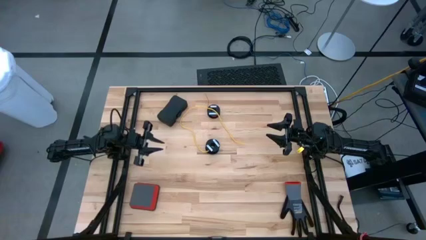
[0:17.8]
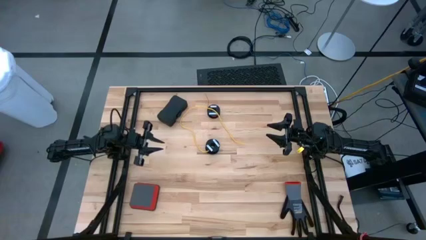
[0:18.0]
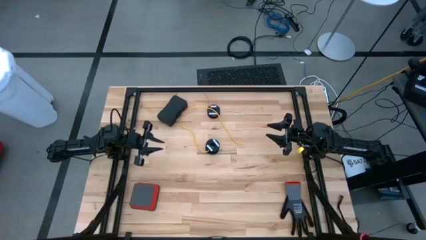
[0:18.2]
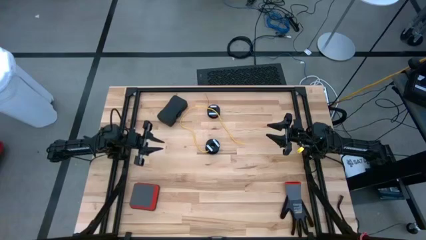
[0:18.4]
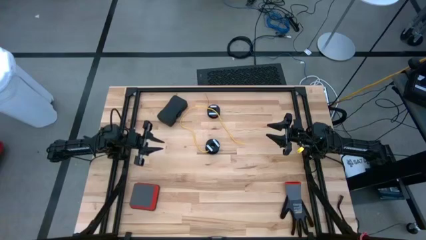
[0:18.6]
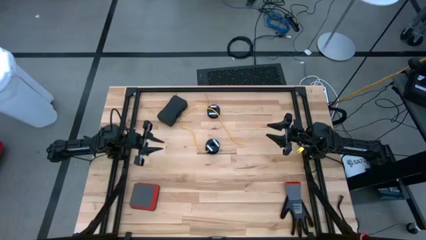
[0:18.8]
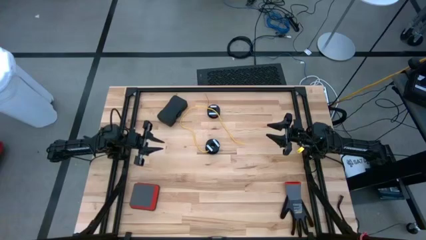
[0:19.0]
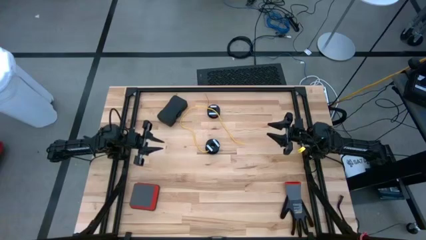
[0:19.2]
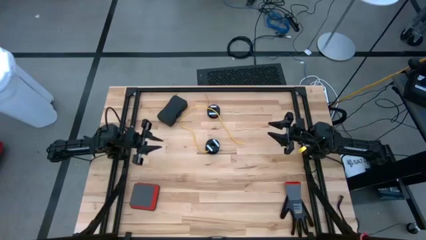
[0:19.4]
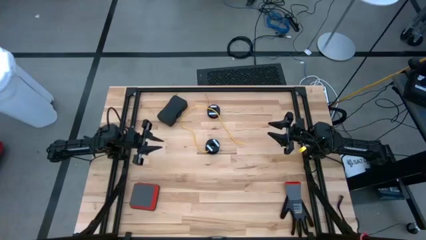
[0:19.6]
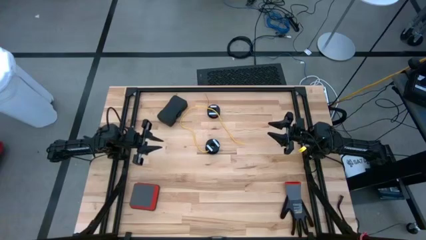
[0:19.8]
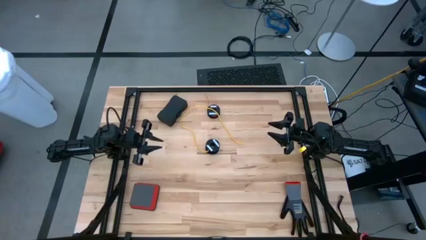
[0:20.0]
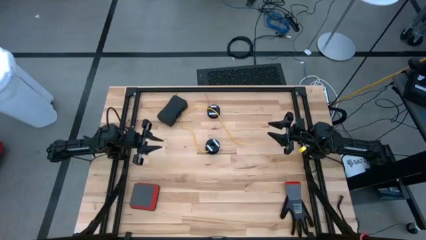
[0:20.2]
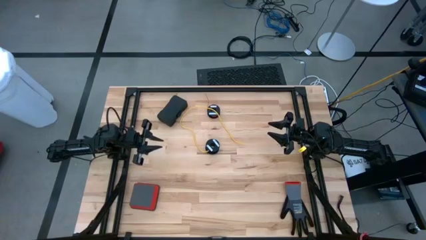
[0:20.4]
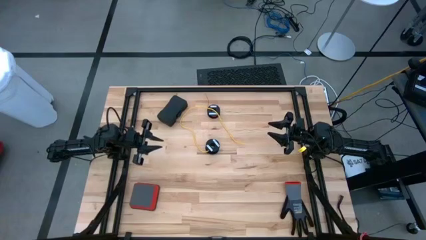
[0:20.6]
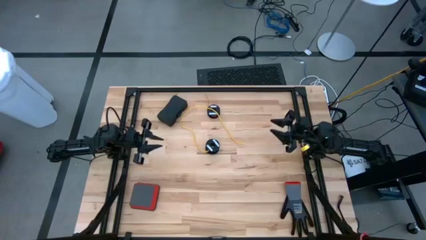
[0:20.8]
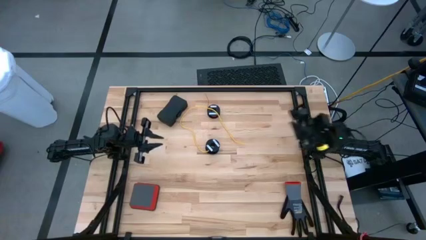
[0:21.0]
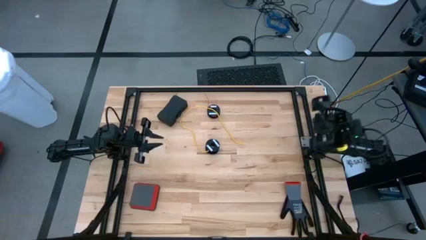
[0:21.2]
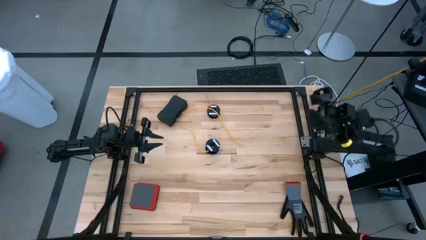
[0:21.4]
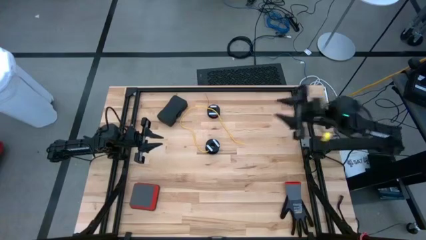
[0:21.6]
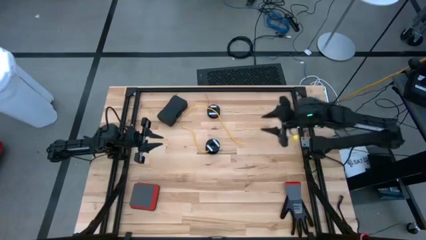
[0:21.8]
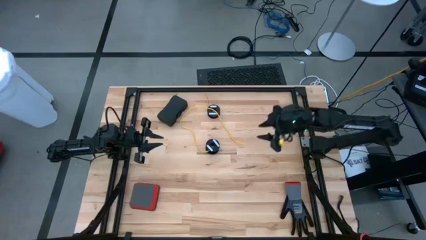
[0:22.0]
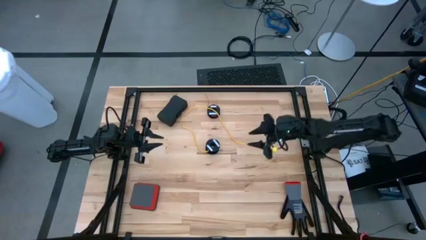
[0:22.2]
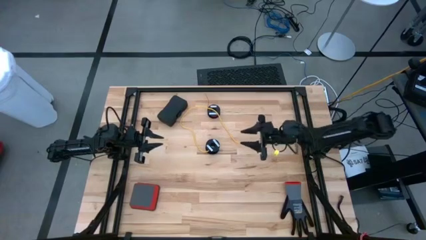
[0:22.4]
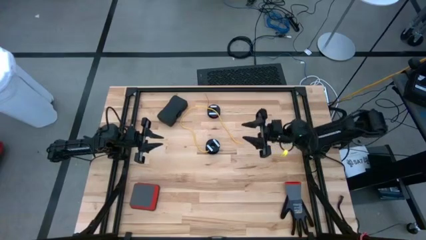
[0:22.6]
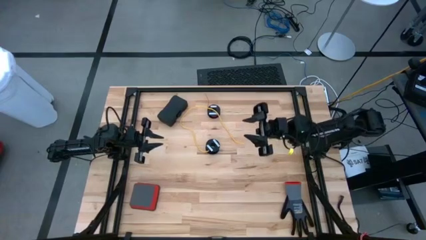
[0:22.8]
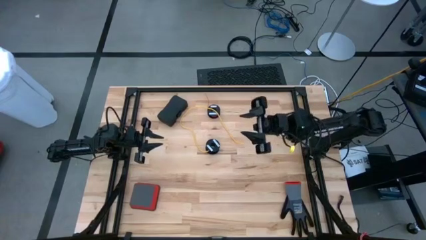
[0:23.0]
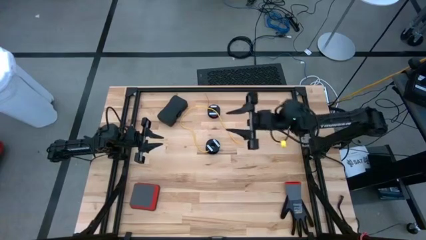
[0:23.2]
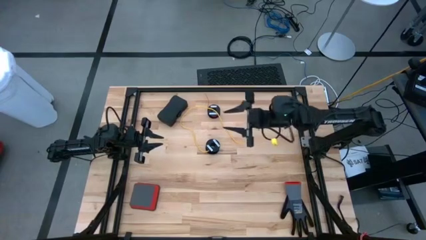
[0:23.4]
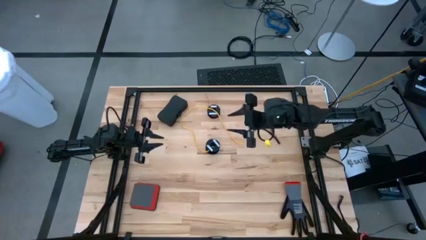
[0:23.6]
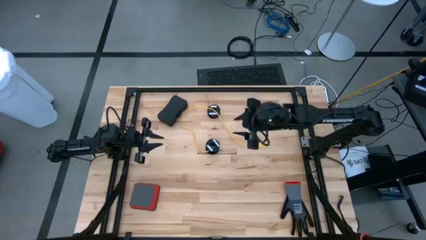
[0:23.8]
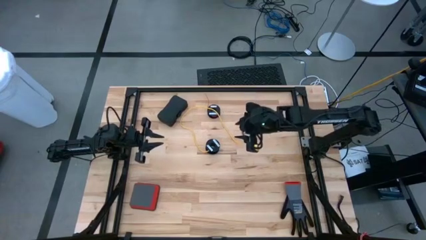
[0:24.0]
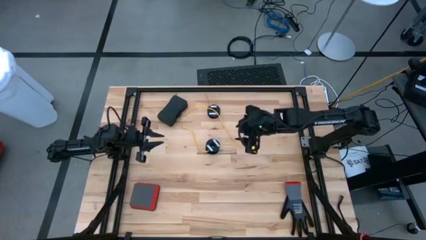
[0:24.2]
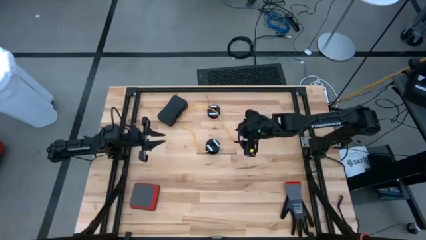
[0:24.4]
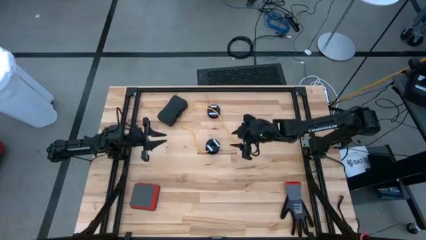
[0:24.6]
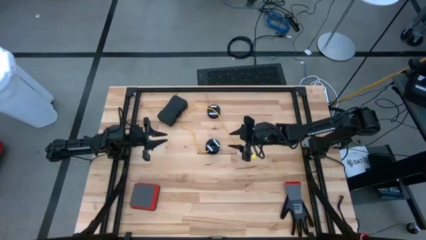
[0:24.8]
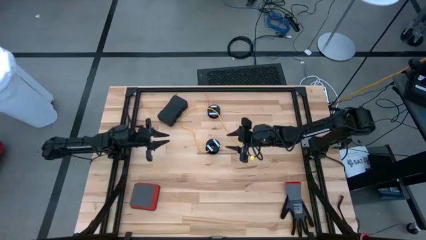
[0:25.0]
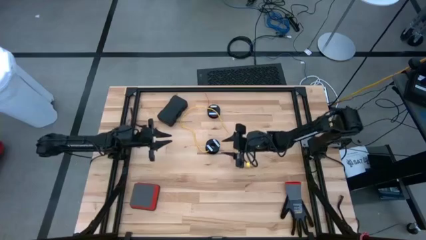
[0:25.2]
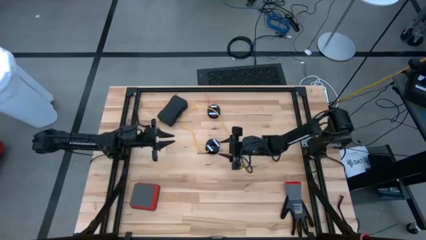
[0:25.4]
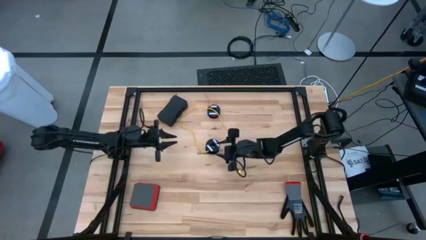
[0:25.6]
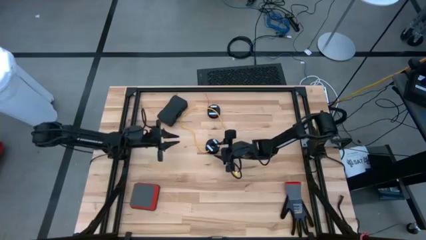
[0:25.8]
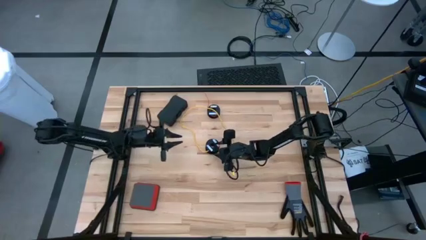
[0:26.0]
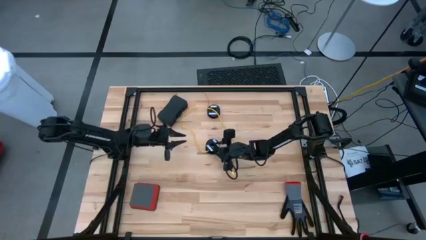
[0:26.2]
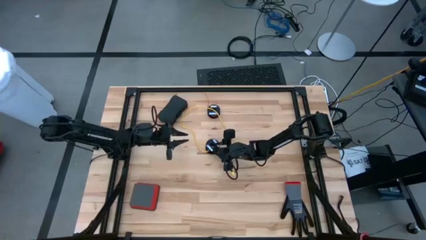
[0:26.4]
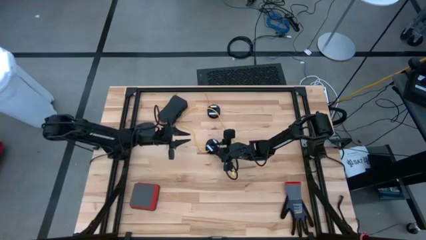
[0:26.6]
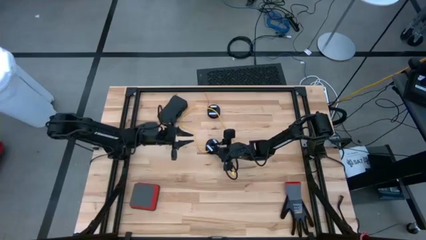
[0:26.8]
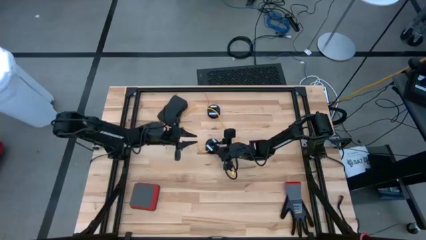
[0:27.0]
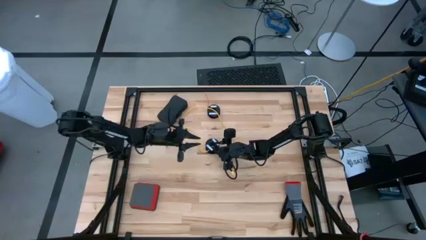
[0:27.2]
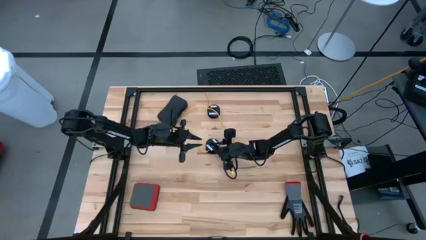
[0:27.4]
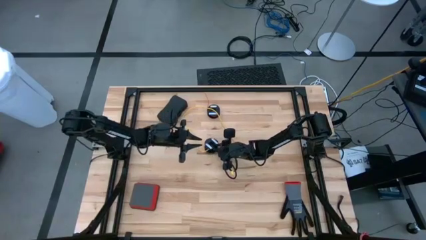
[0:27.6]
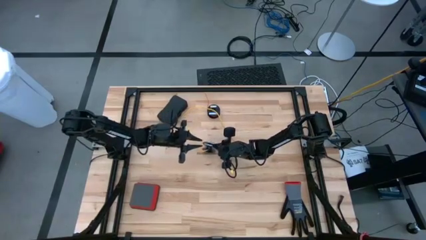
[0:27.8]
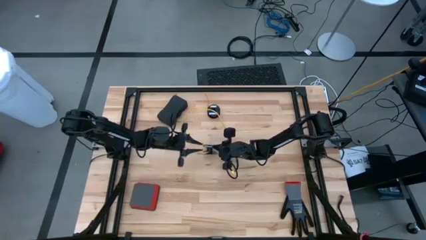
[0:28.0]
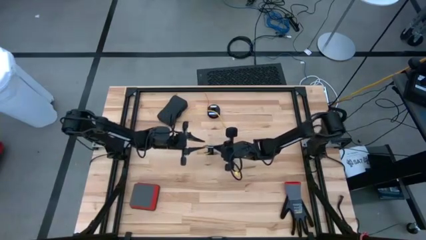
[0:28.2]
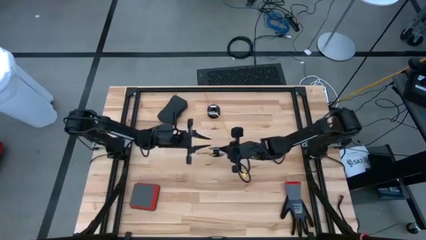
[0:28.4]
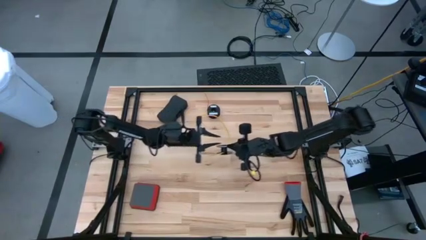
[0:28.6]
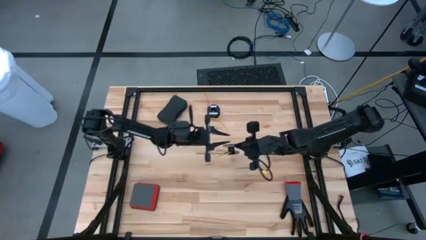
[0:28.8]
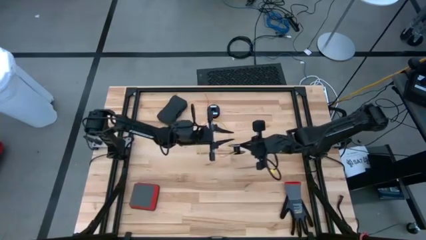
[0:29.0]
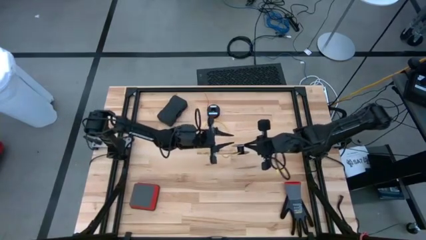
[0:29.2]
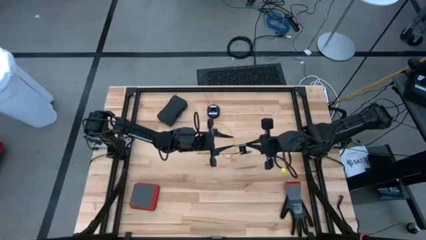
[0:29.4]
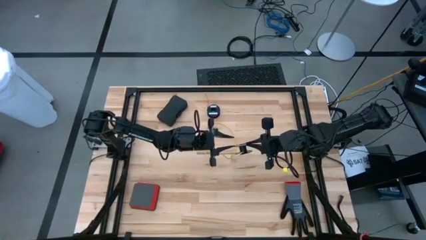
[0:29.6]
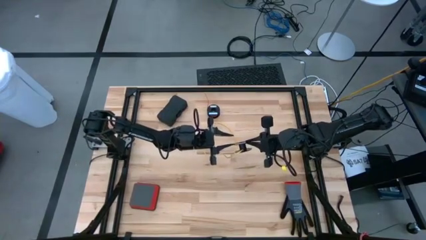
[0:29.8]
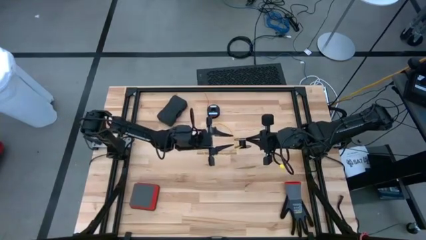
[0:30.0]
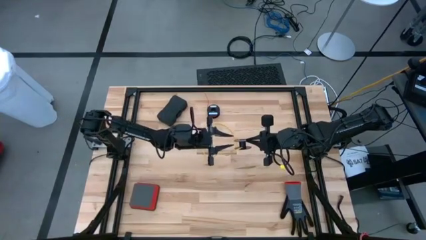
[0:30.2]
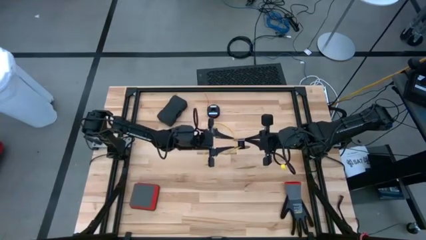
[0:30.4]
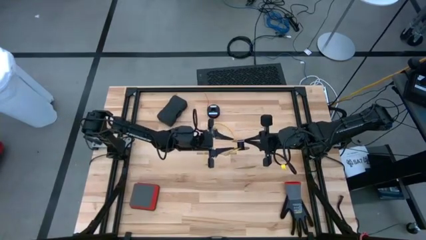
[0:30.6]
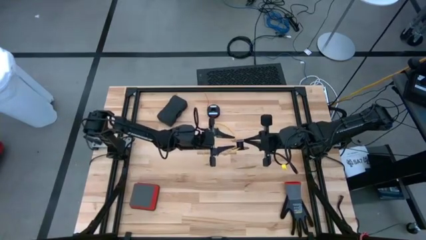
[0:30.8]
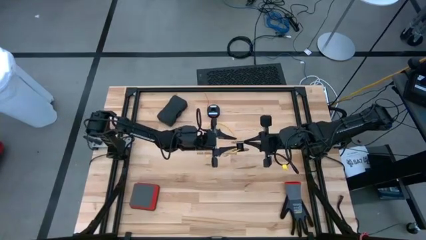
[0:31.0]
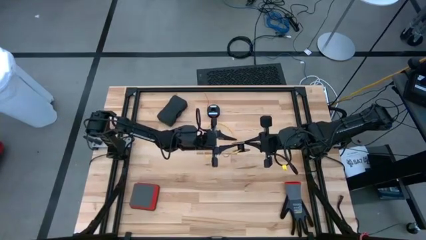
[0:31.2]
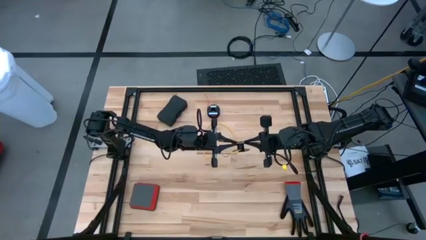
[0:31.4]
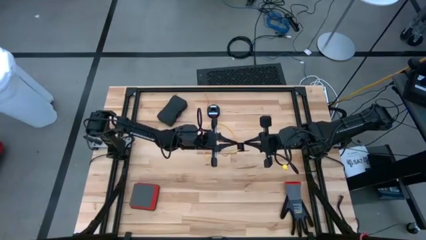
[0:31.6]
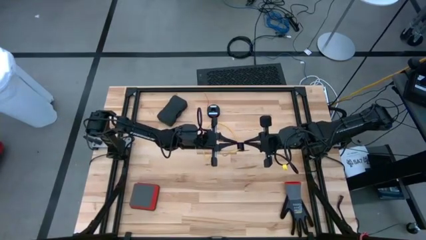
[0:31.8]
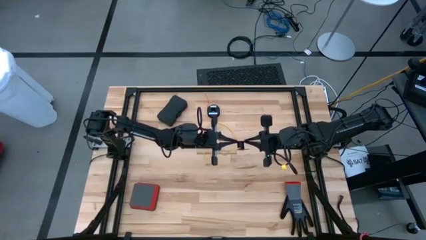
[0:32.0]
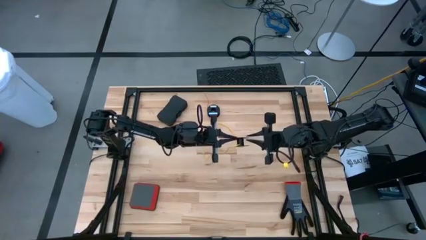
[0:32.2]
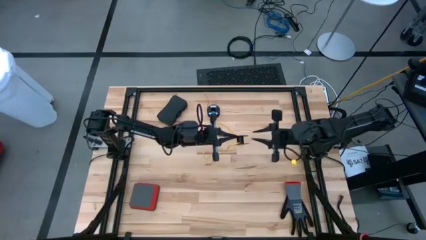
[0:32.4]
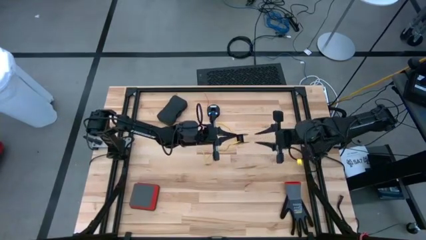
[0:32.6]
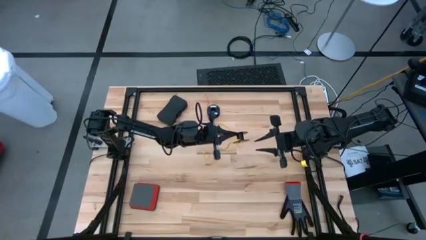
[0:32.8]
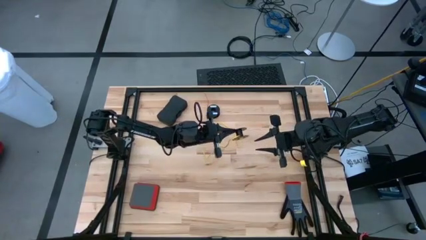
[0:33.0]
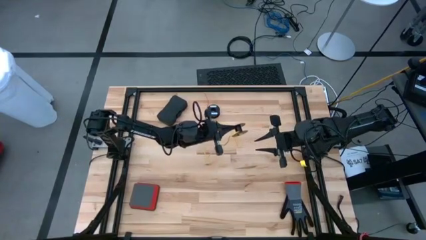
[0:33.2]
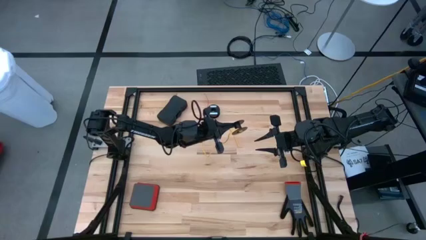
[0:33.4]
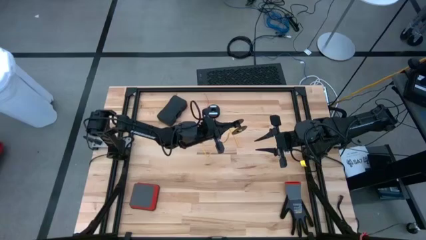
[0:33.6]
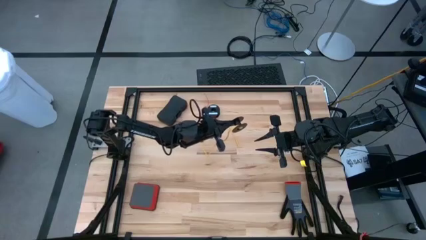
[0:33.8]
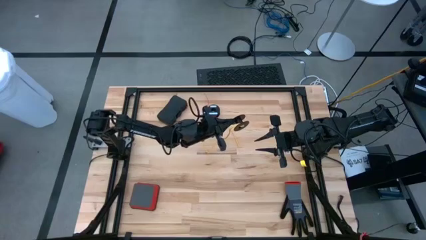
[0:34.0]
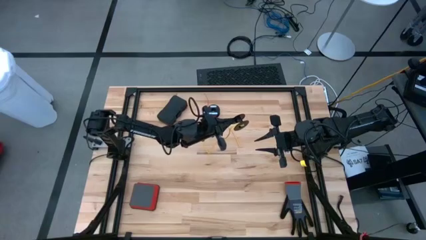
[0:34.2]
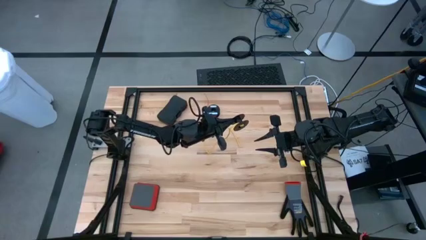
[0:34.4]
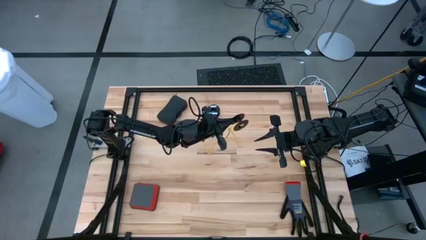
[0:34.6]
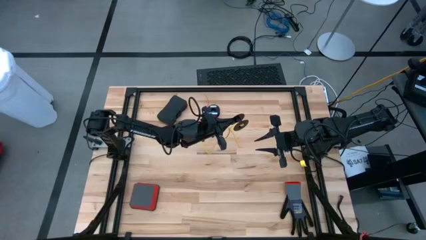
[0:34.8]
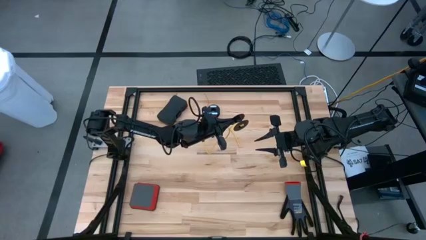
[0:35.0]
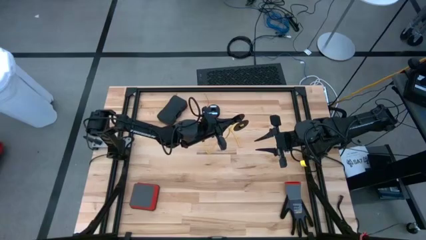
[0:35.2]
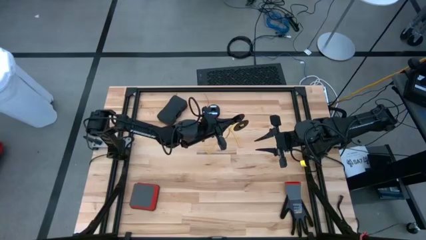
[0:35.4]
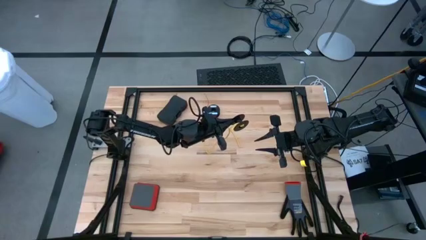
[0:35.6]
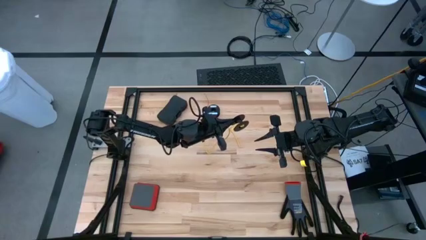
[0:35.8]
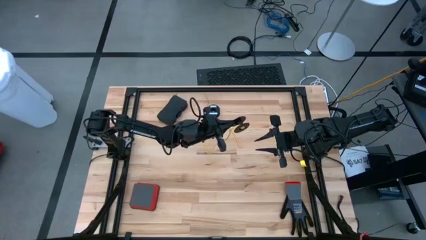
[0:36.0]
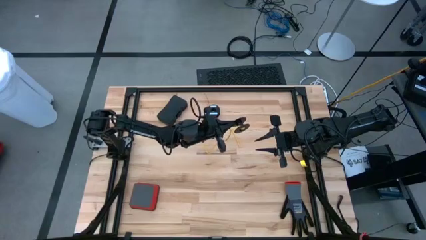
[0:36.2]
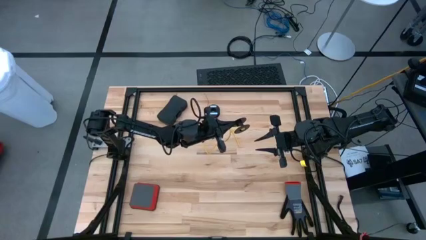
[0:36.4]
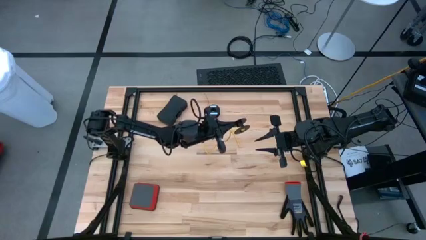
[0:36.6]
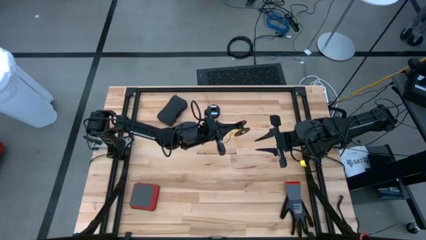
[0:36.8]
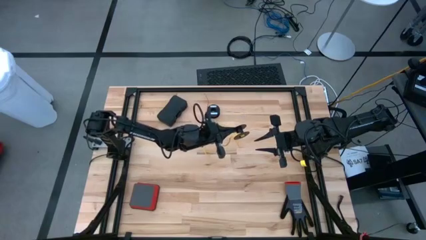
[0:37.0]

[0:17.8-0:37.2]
Task: Coil cords
Coil the yellow wire onto the black spool
